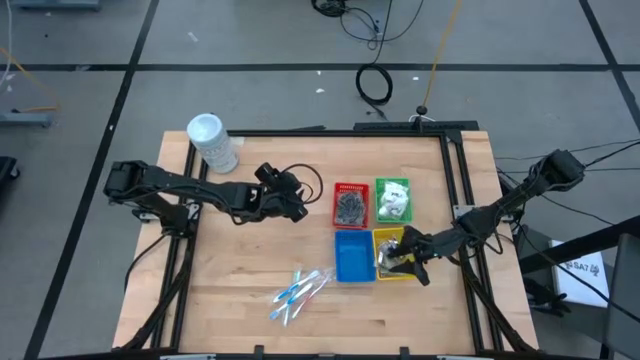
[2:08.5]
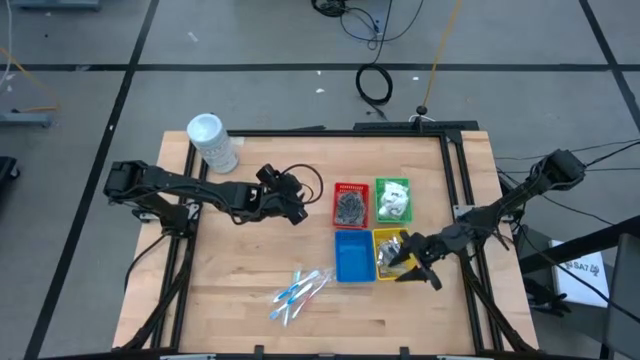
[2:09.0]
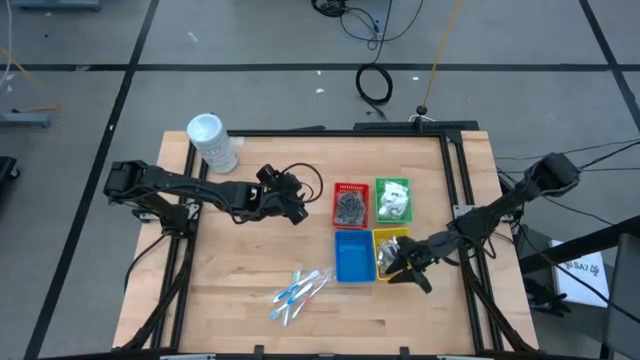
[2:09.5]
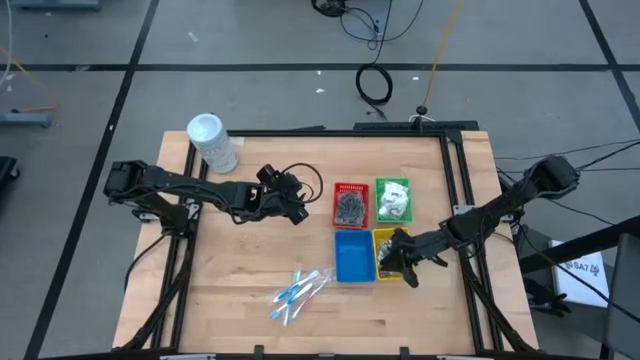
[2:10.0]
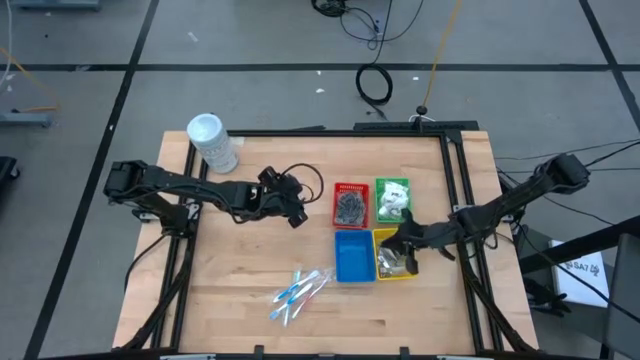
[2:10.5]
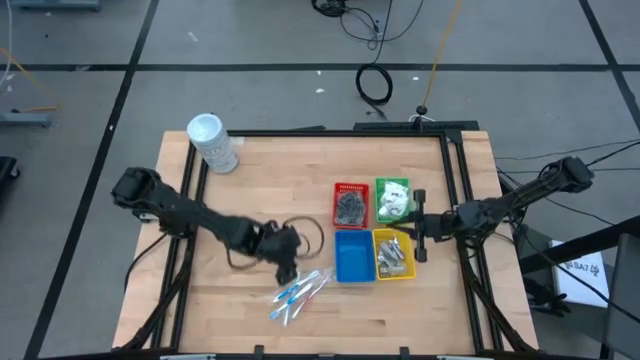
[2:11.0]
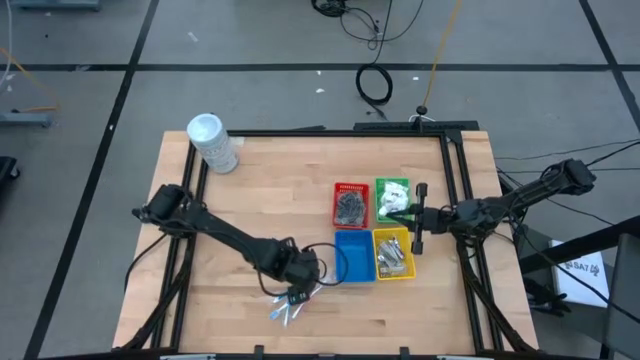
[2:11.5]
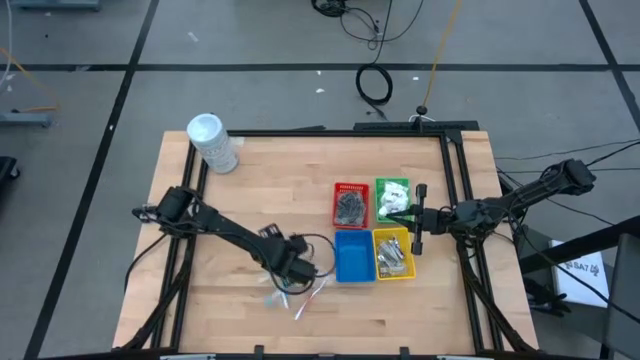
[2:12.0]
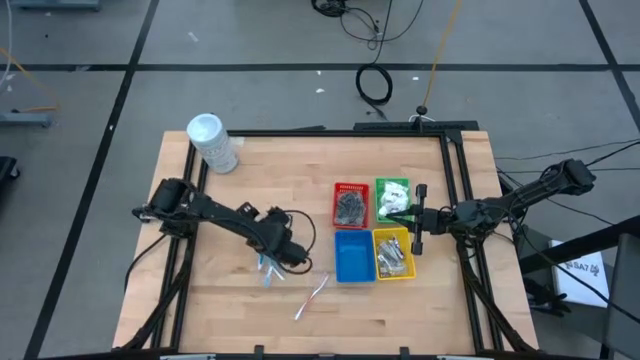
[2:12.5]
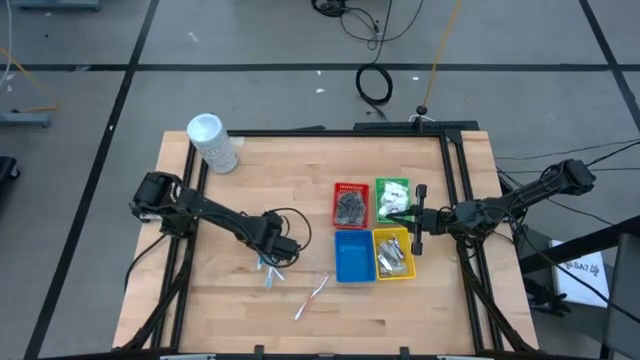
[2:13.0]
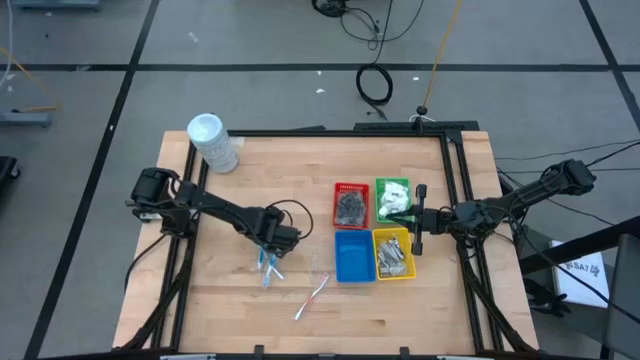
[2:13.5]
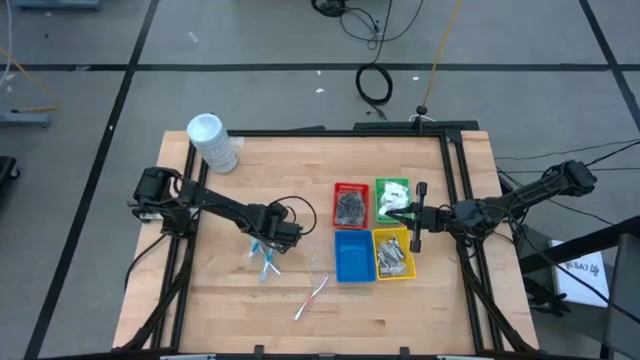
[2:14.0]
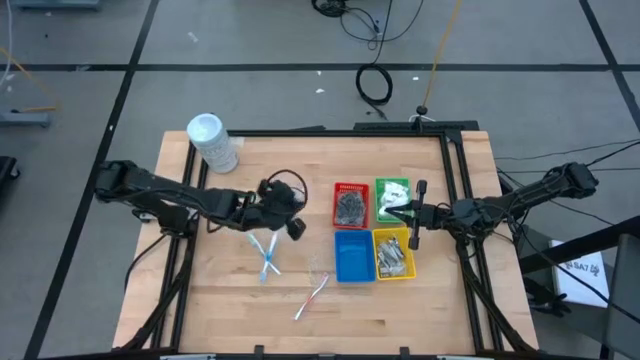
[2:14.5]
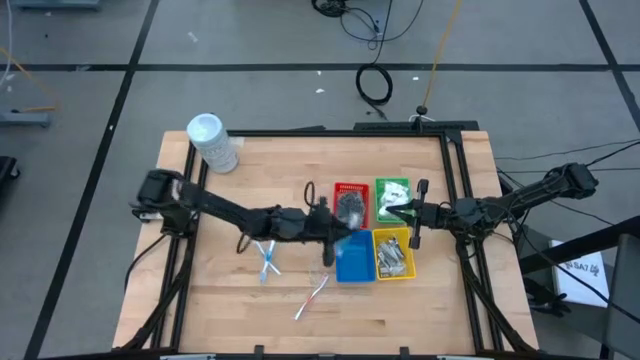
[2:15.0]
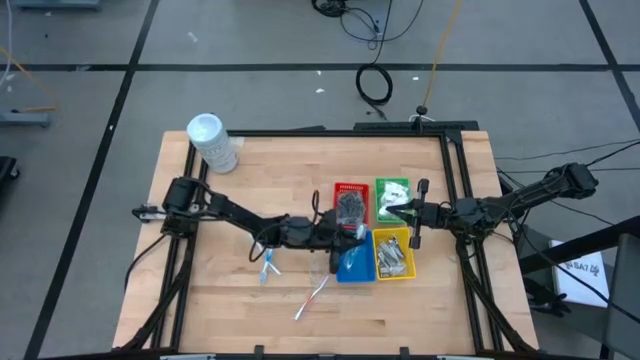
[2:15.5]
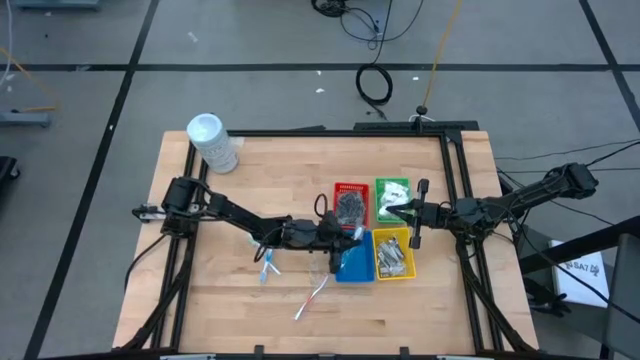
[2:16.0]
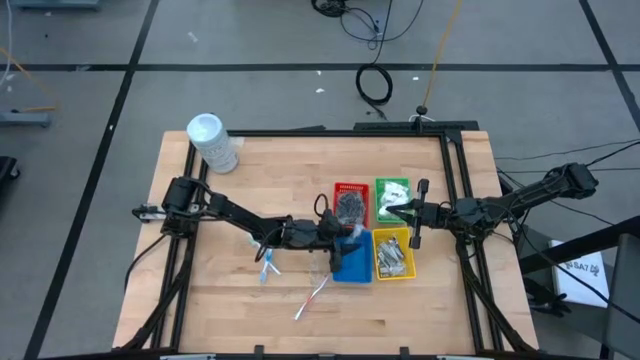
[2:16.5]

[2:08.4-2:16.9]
Task: Pick & Place Travel size toiletries
Put the blue toothbrush into the blue bin

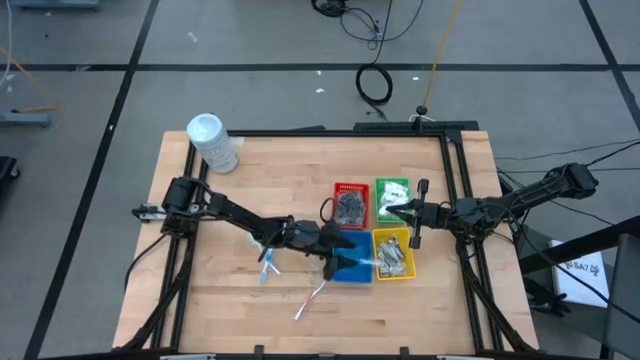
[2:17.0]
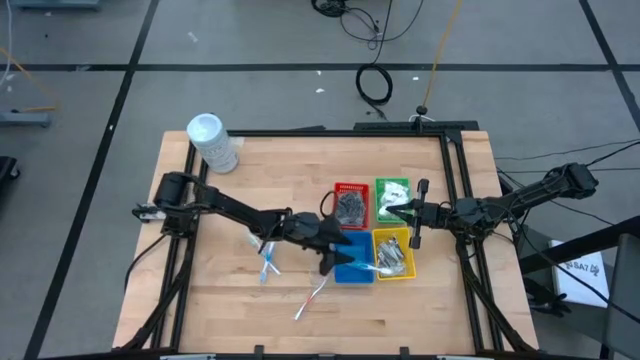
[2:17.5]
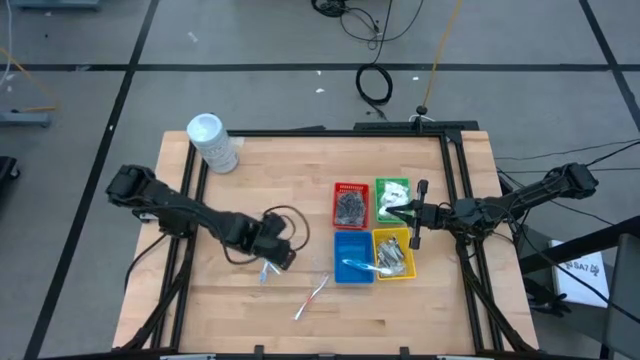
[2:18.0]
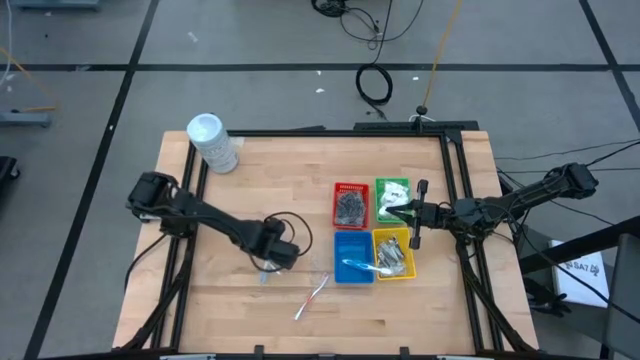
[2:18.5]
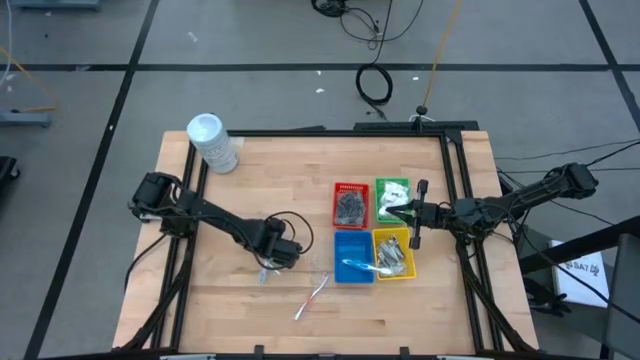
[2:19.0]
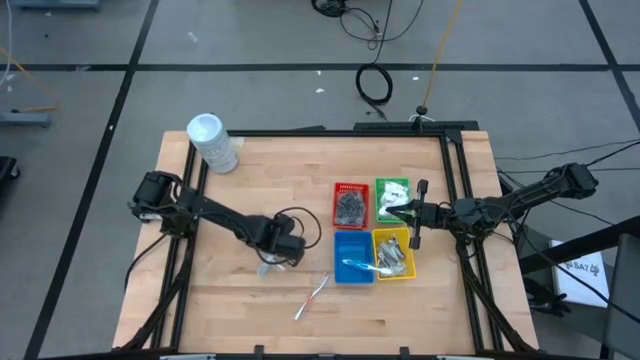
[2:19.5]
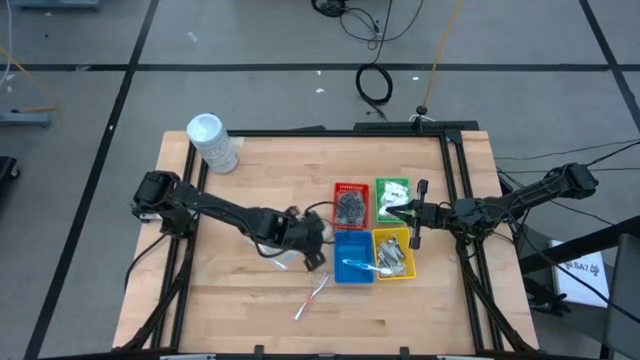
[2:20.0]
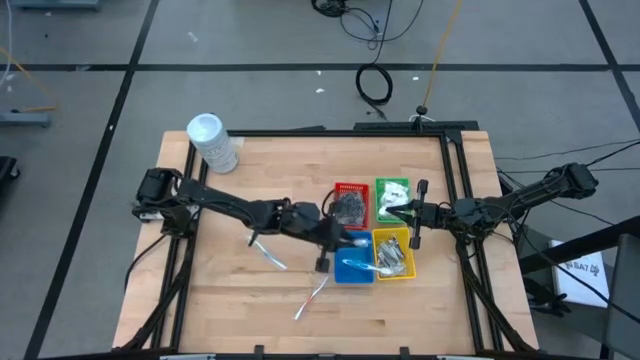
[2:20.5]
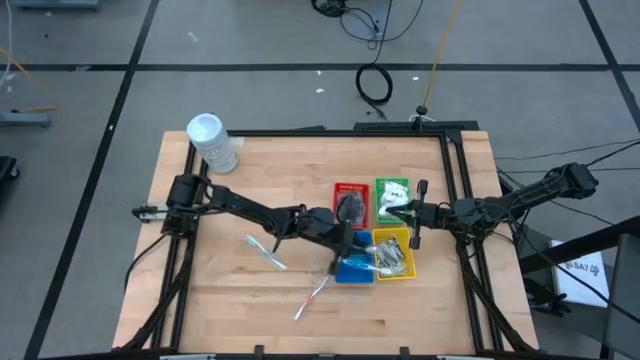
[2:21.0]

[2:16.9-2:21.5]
Put the blue toothbrush into the blue bin

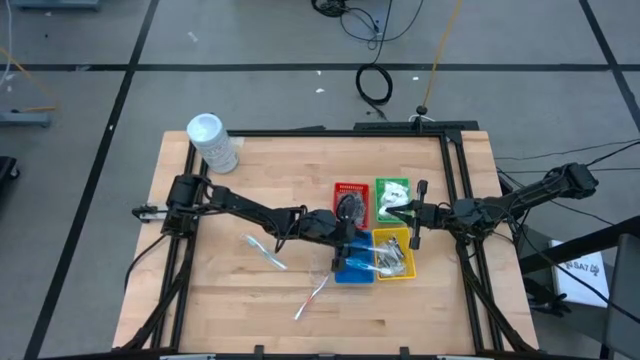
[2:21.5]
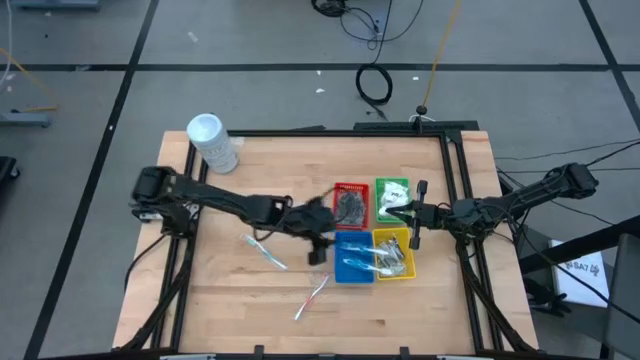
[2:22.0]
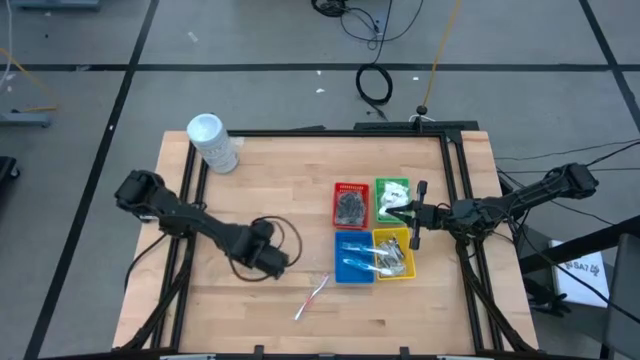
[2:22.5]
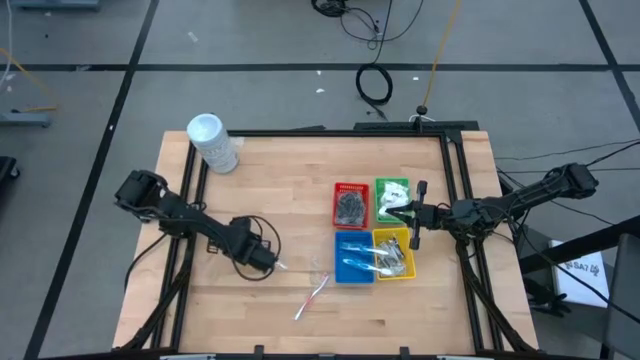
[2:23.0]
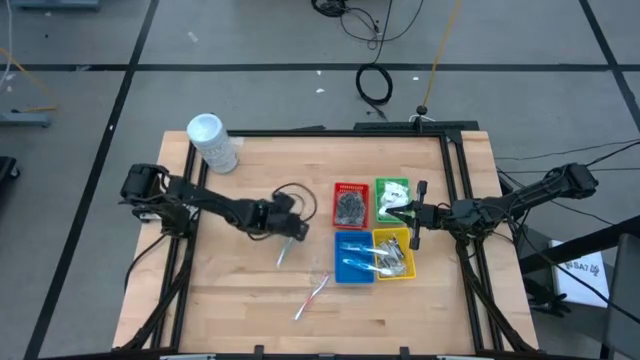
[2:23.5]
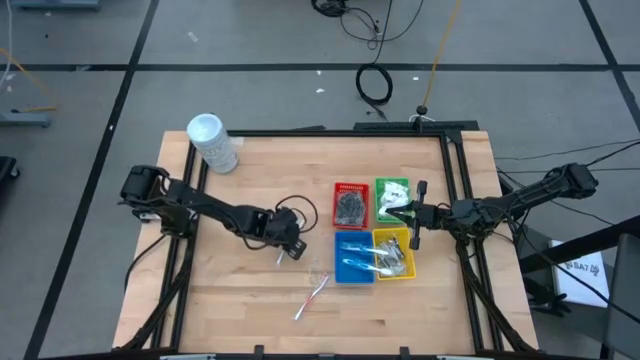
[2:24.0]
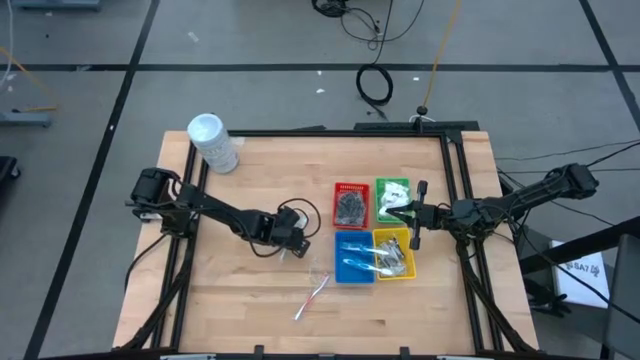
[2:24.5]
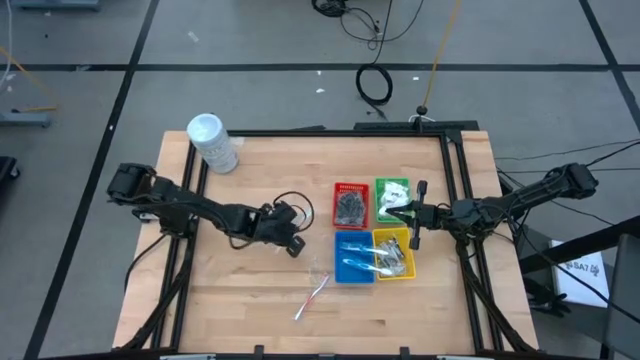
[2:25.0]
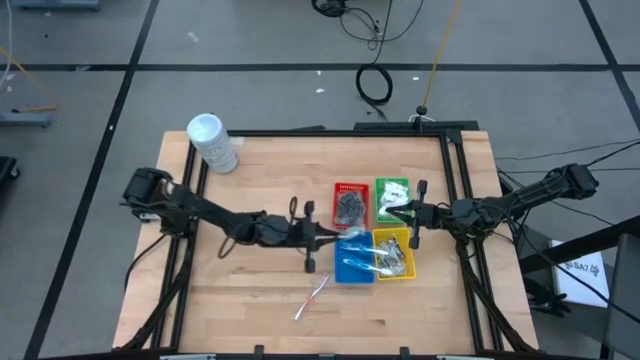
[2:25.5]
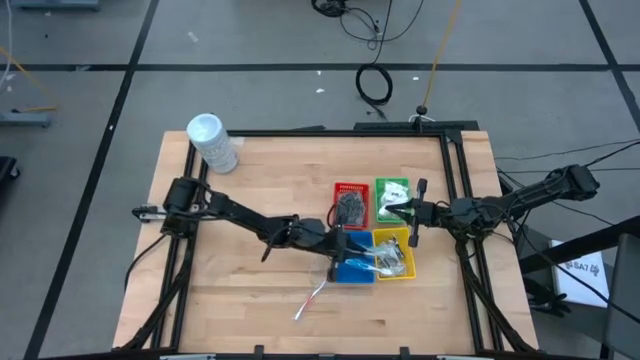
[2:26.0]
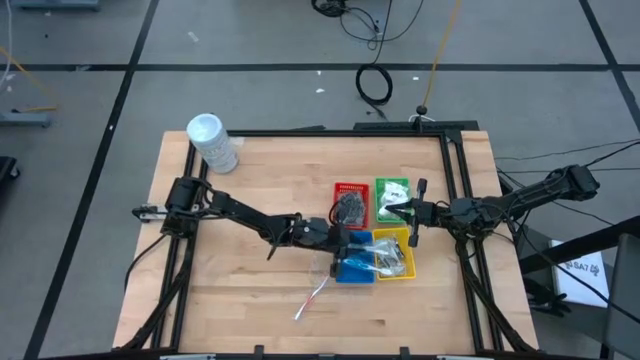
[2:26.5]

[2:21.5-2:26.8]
Put the green toothbrush into the blue bin

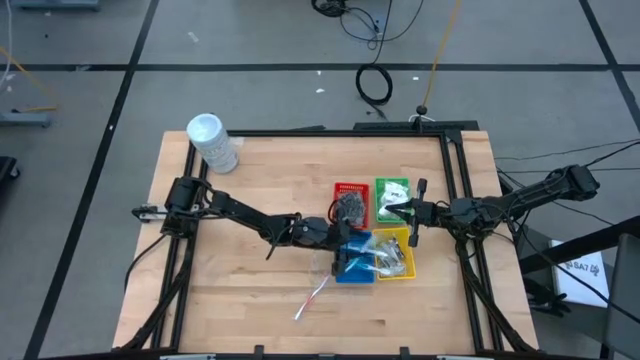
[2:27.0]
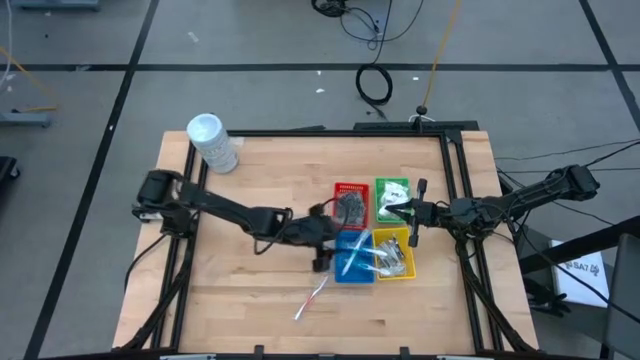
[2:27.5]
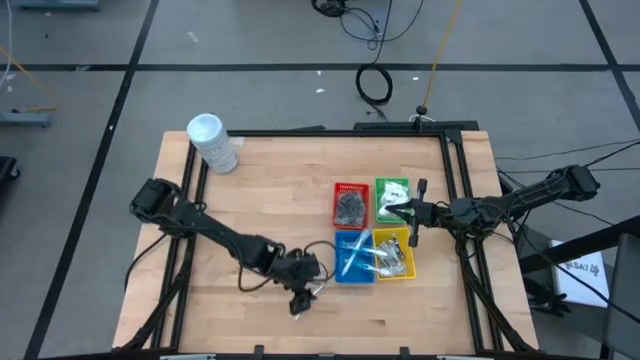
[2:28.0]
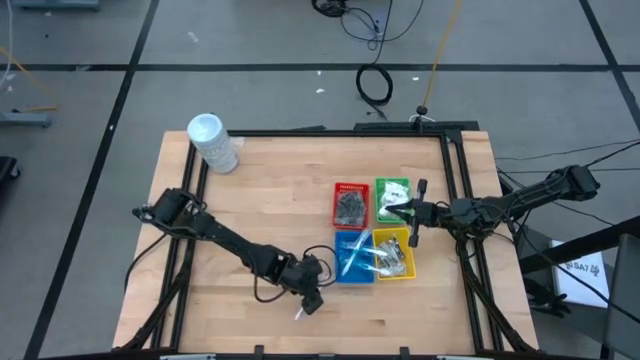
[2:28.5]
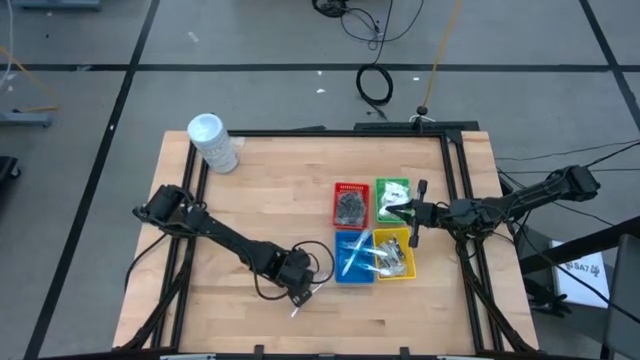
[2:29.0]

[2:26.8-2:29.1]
Put the orange toothbrush into the blue bin
